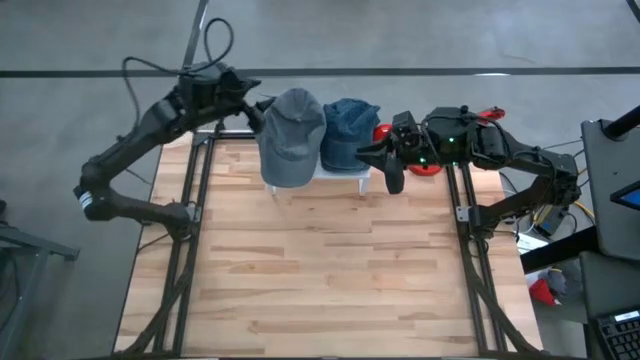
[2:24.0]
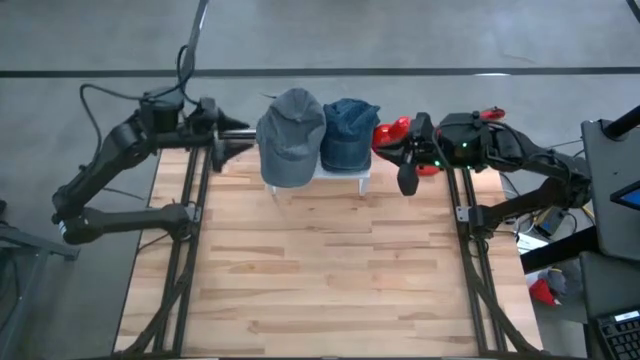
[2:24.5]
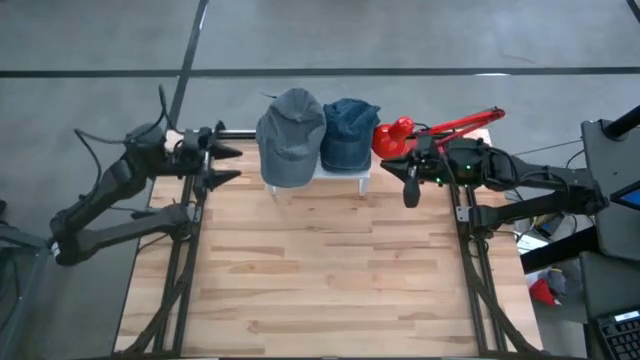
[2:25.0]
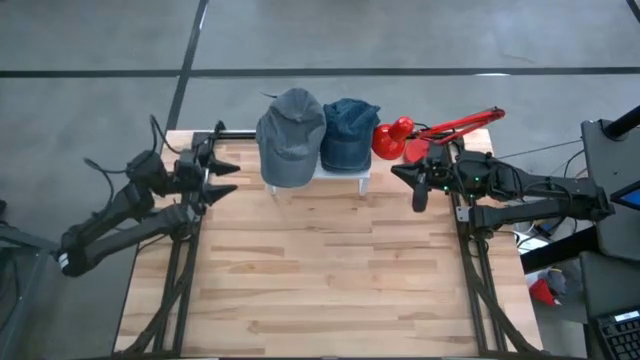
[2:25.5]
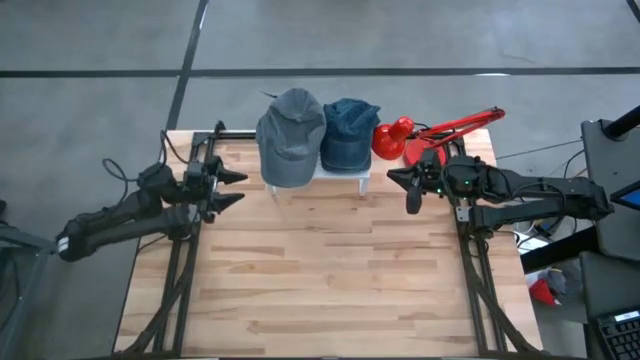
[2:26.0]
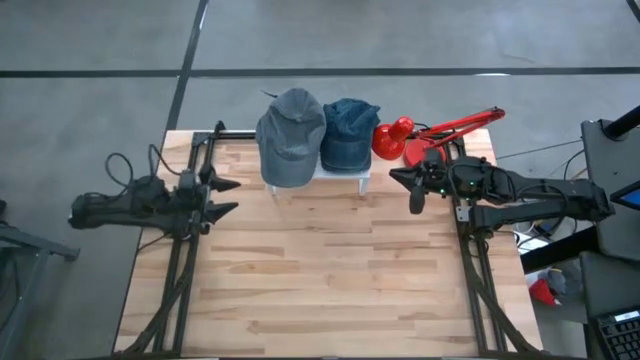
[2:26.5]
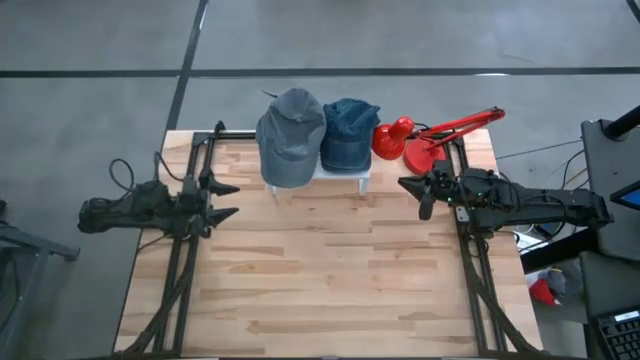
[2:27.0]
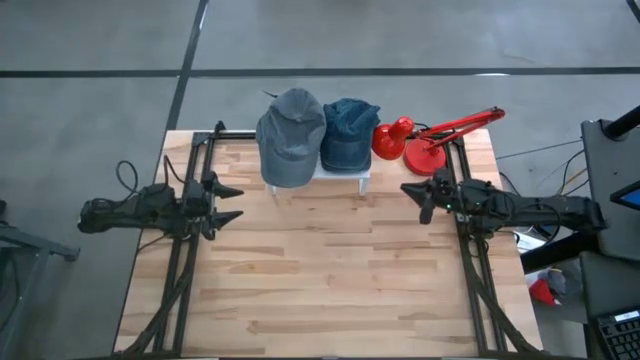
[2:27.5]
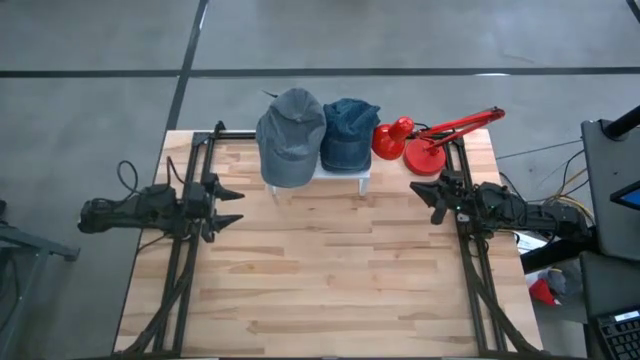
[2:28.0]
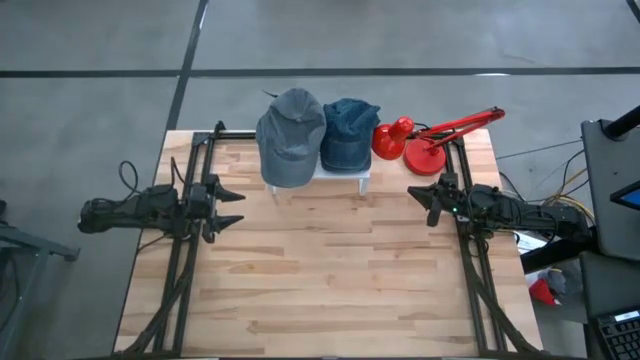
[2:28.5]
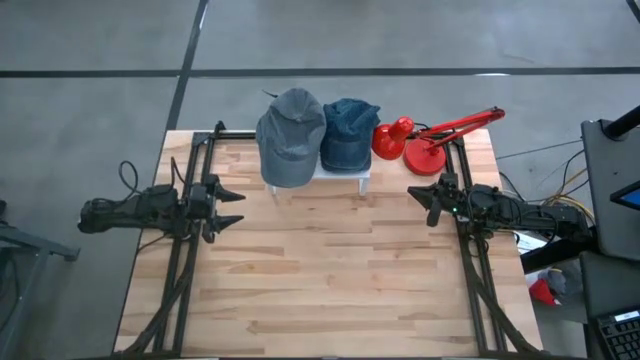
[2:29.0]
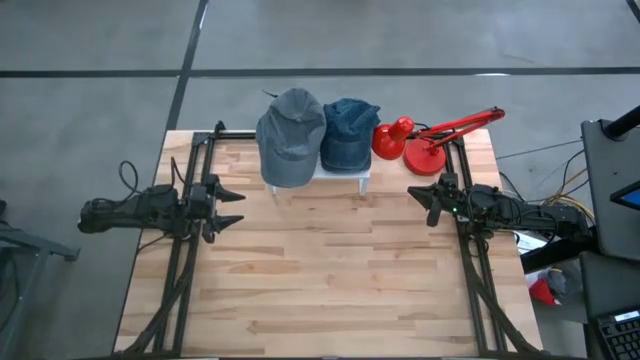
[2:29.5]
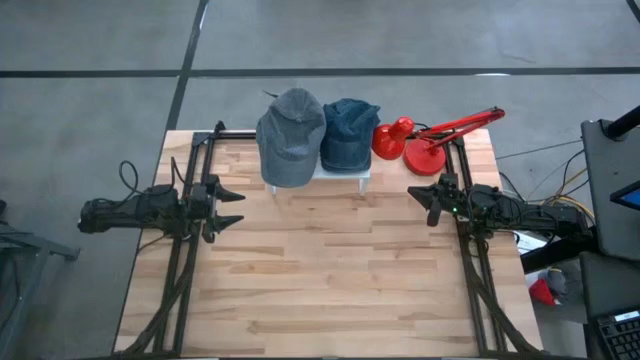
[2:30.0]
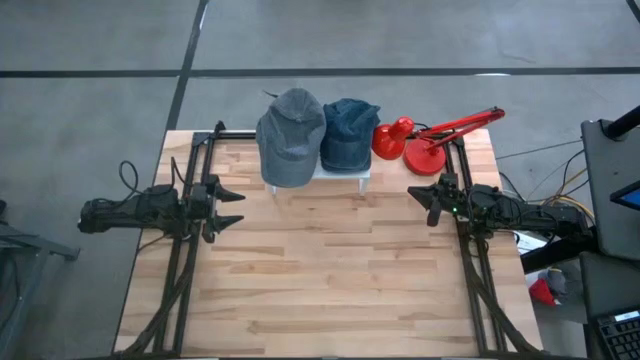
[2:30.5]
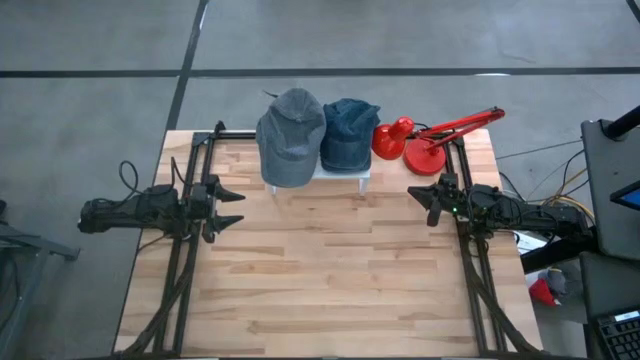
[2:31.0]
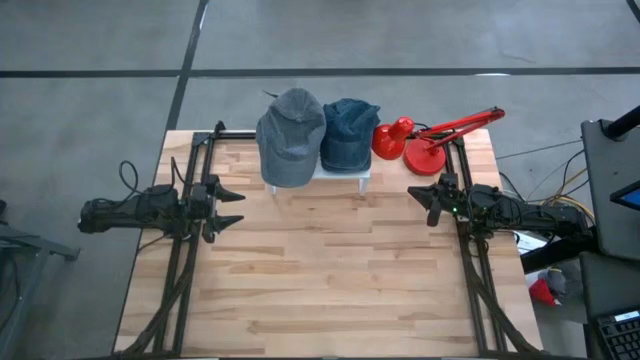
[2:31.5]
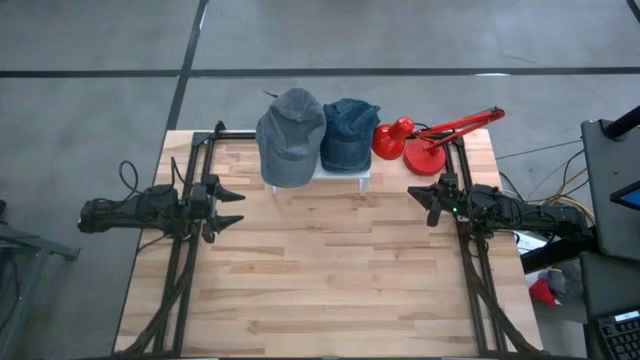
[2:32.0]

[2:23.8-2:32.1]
Task: Pick & Place hat
Return to Home Position

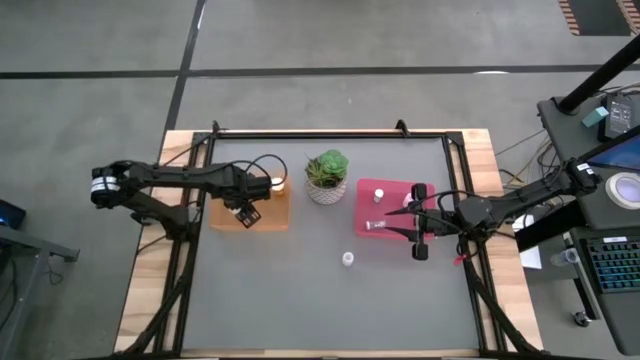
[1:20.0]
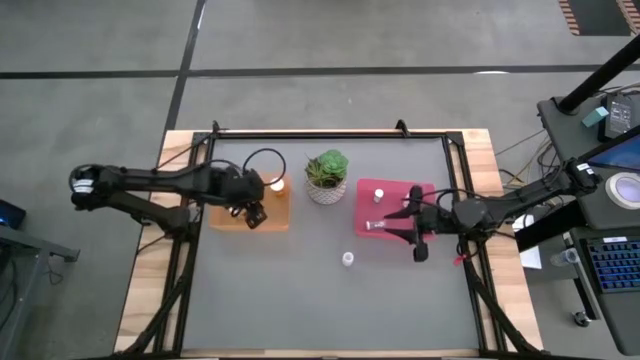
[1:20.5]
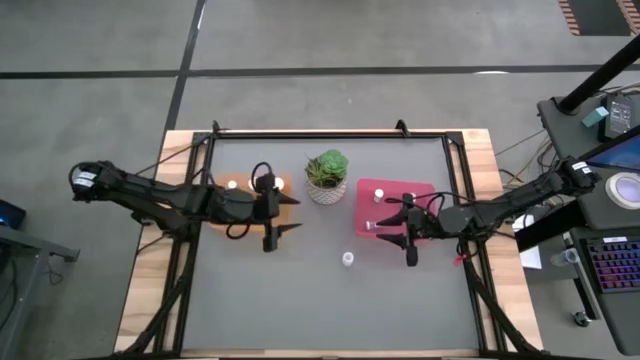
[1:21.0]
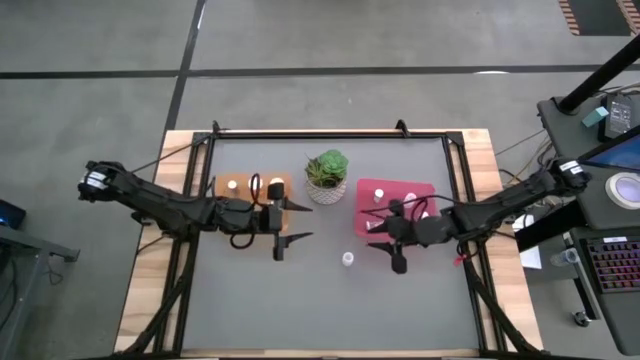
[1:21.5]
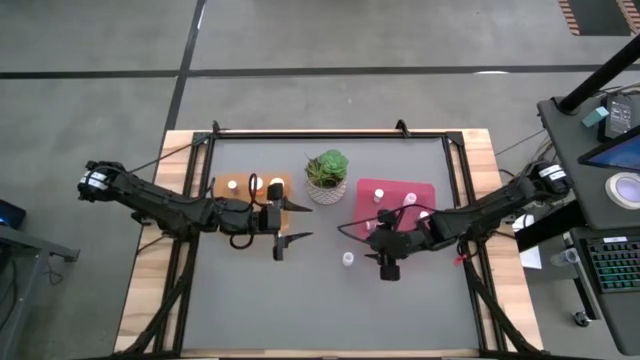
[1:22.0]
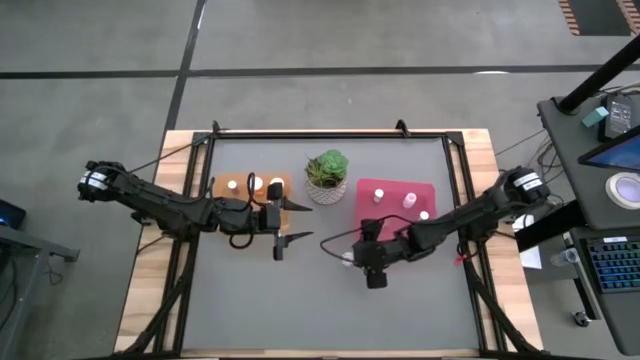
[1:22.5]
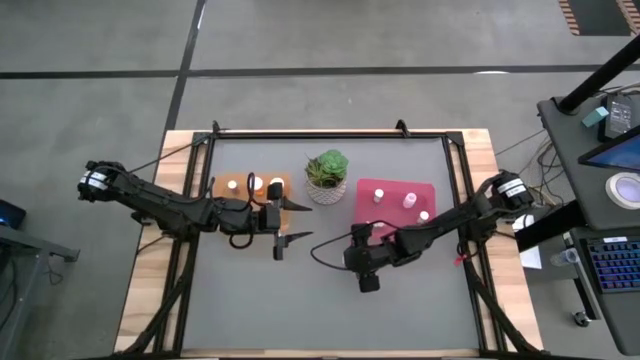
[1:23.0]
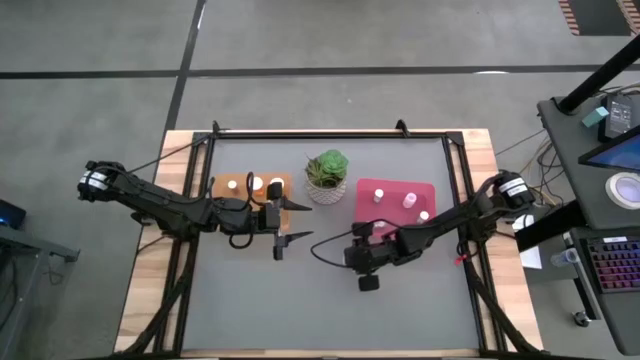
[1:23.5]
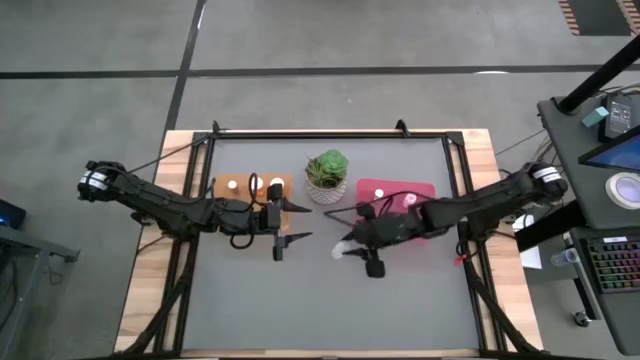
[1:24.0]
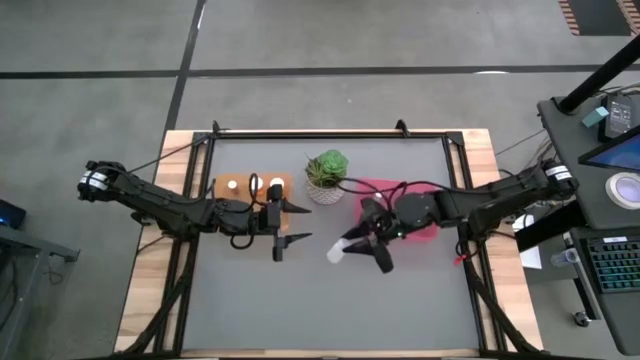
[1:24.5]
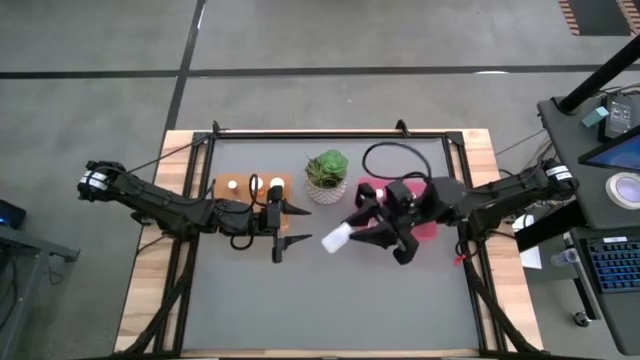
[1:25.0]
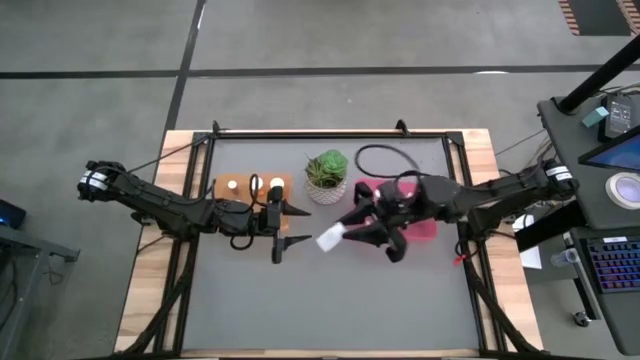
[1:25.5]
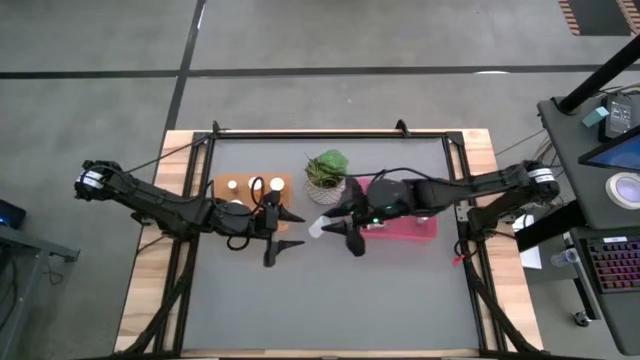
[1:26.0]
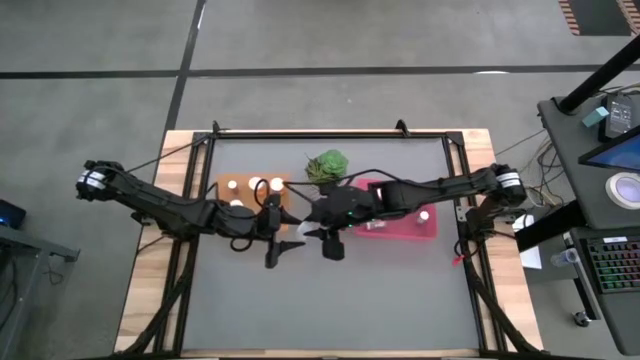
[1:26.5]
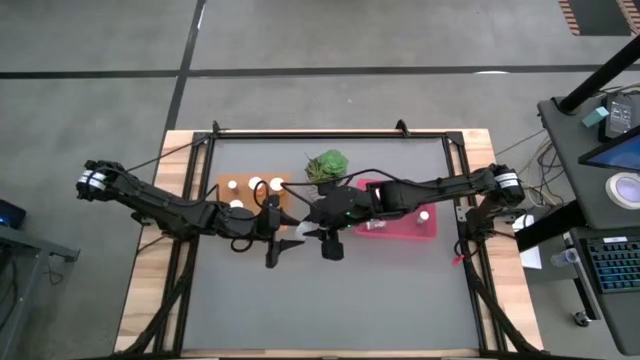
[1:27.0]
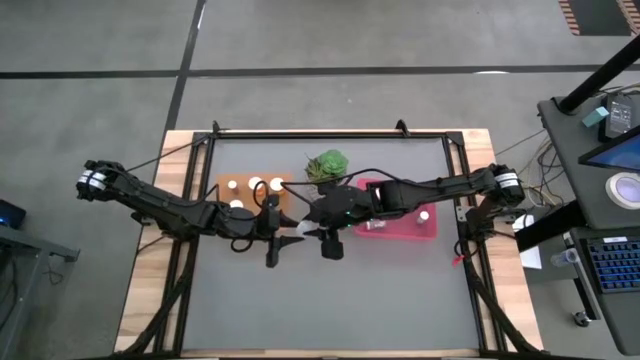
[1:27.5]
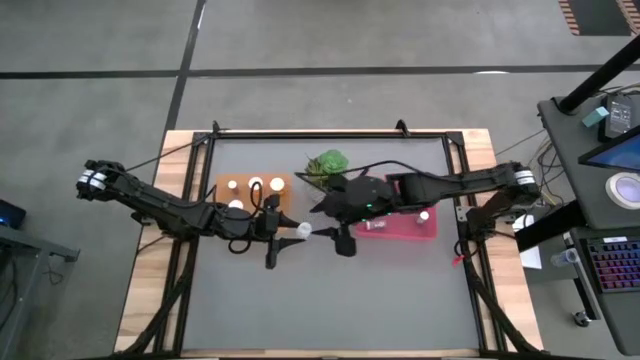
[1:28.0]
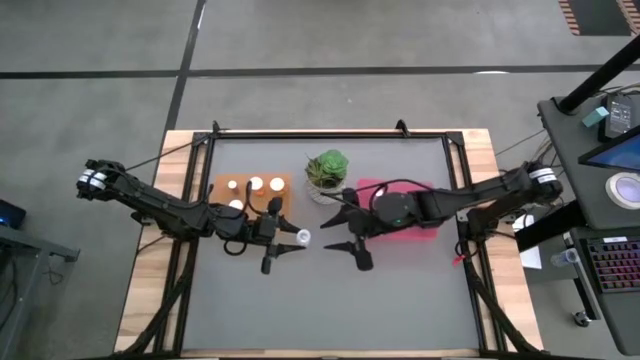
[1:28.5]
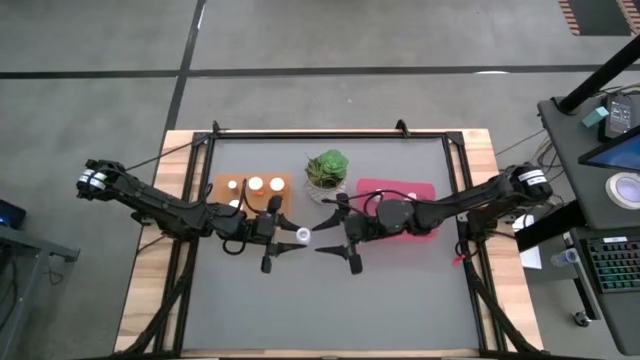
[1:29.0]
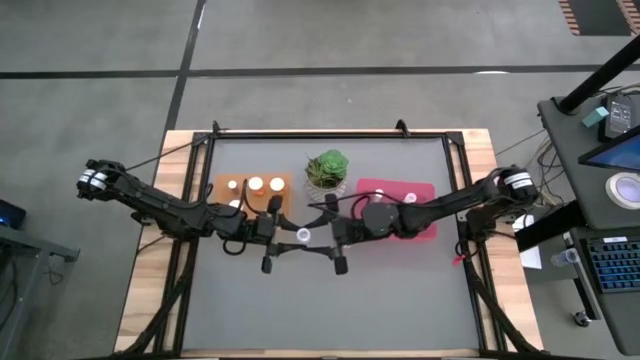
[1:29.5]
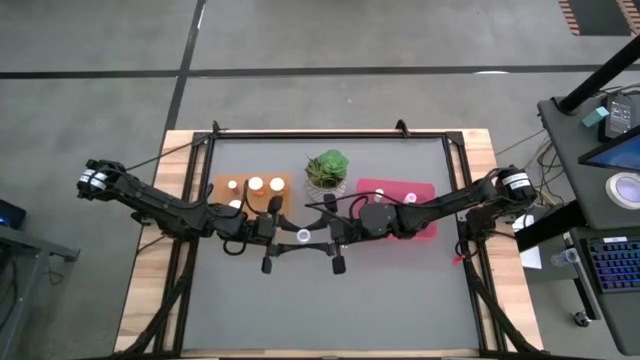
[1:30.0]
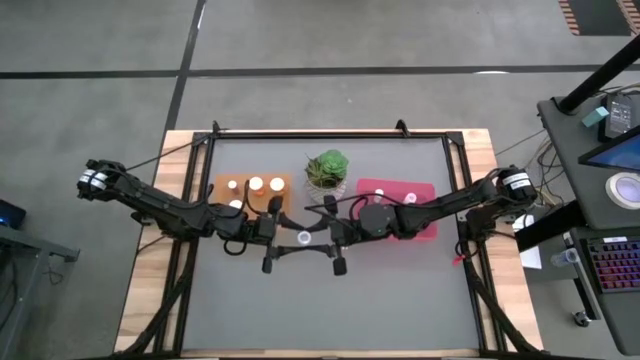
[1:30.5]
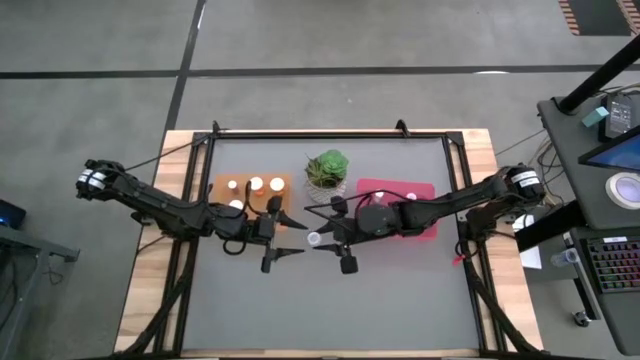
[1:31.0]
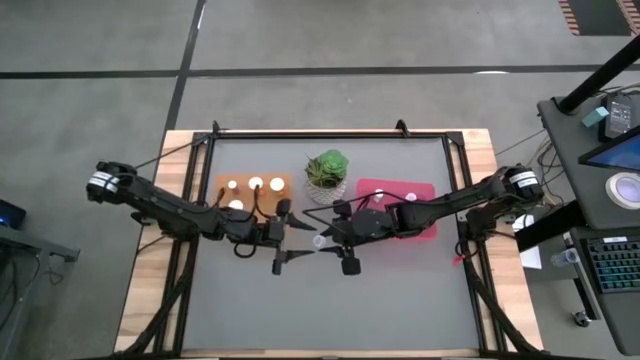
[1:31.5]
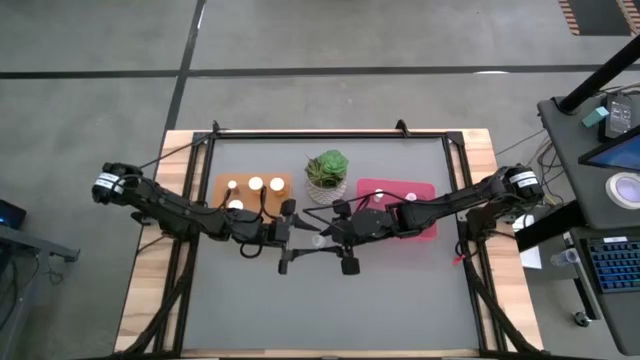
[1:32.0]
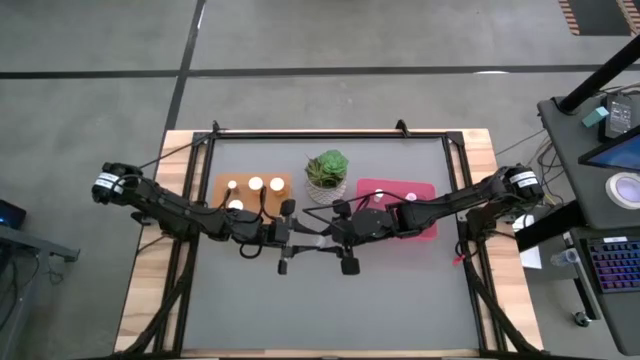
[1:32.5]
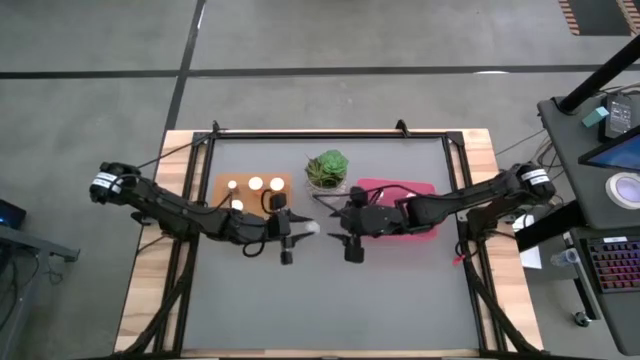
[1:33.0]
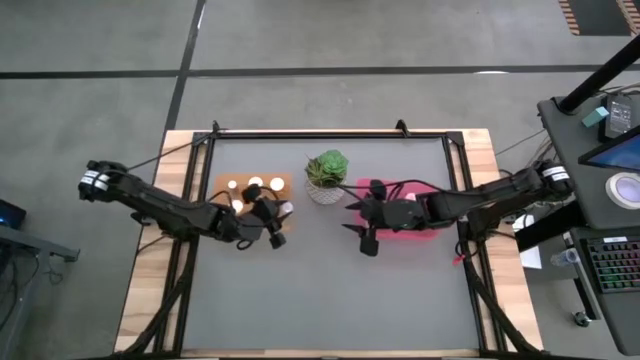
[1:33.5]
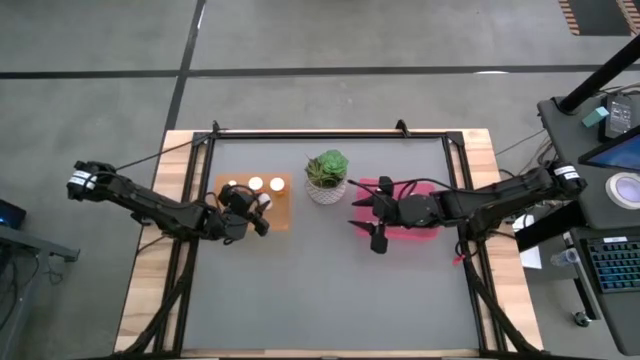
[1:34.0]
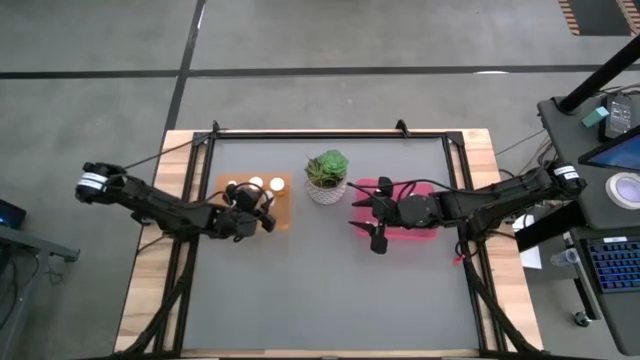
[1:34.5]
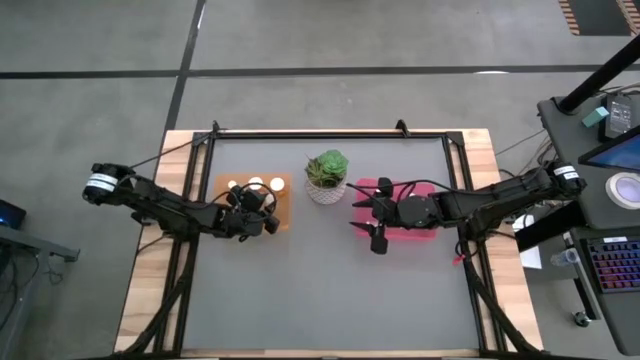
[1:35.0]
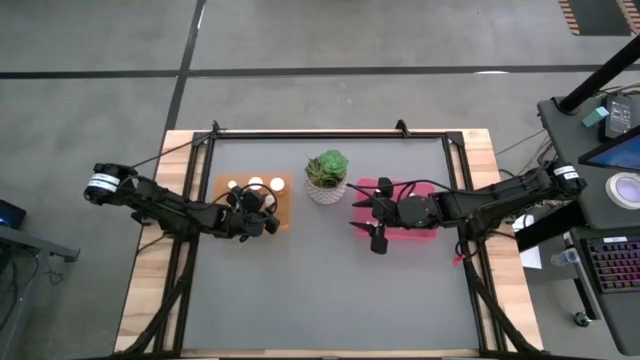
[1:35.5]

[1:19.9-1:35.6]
Task: Pick and place medicine bottles into bin by pill shape (circle, oval)
Put the small white pill bottle in the pink bin
